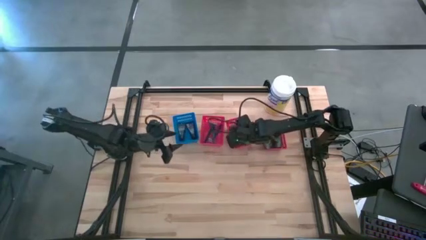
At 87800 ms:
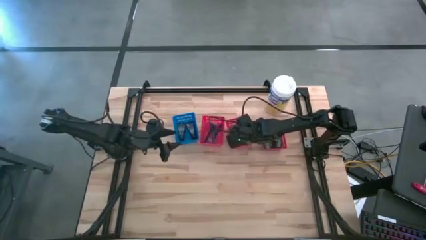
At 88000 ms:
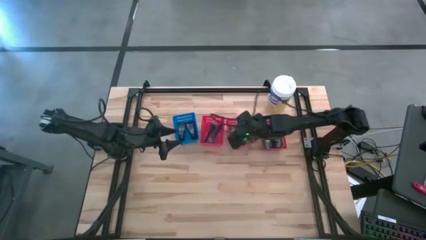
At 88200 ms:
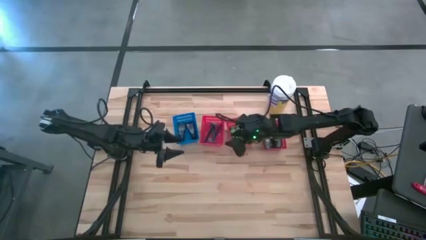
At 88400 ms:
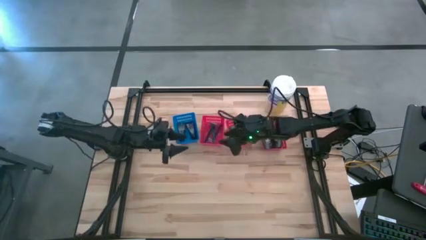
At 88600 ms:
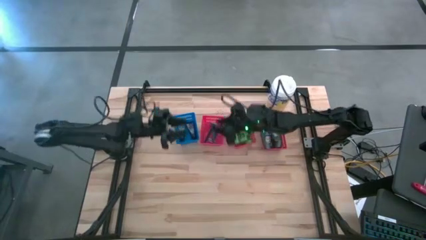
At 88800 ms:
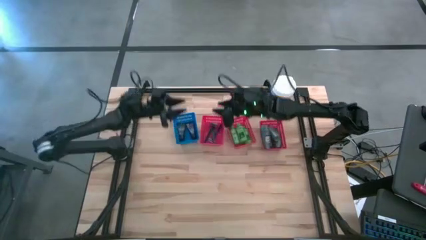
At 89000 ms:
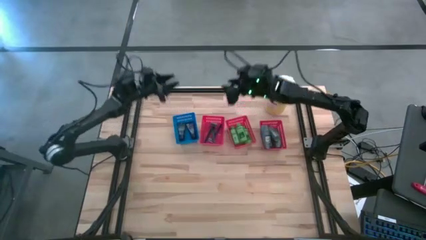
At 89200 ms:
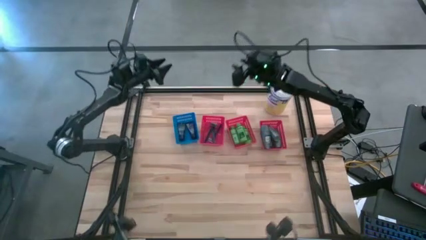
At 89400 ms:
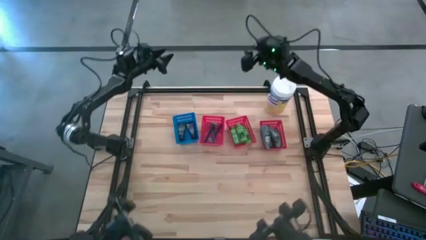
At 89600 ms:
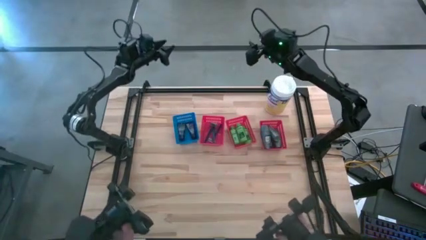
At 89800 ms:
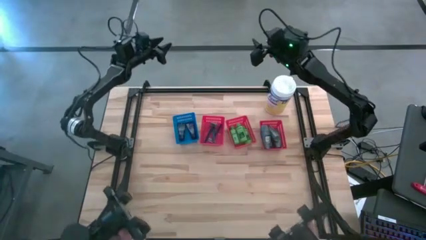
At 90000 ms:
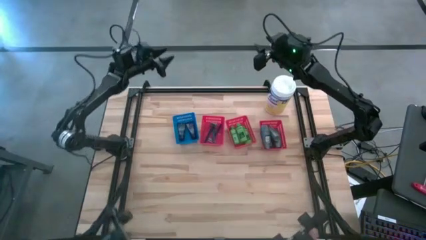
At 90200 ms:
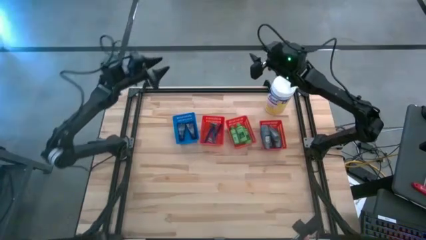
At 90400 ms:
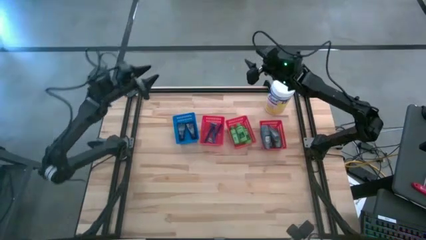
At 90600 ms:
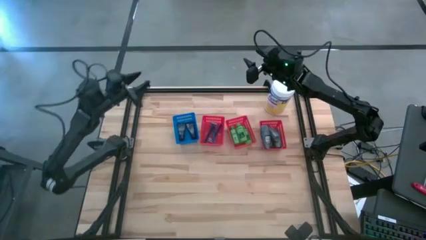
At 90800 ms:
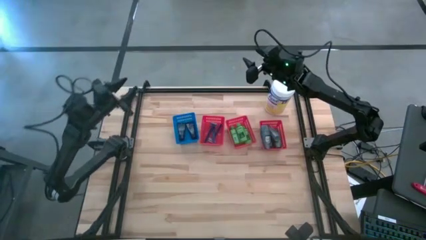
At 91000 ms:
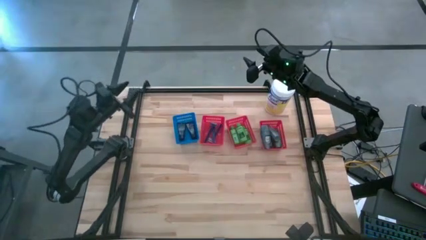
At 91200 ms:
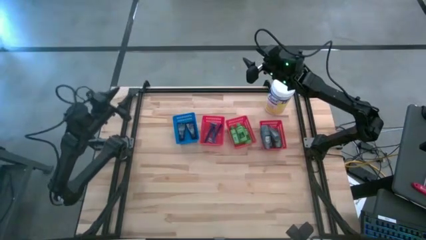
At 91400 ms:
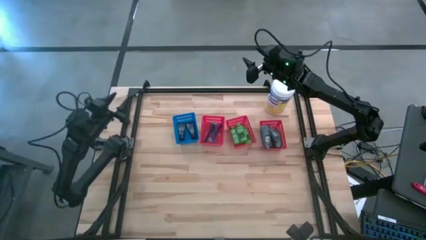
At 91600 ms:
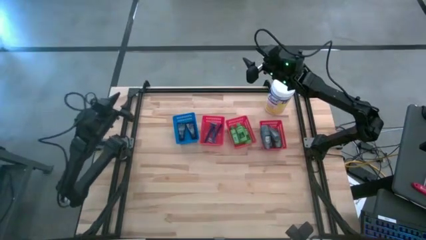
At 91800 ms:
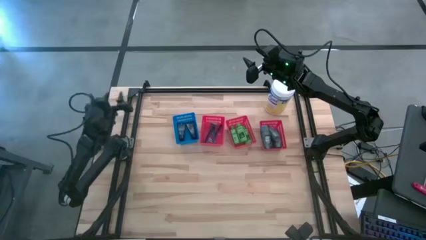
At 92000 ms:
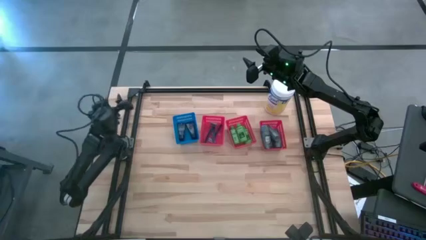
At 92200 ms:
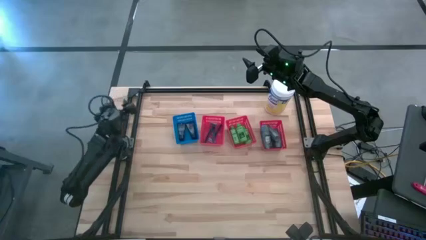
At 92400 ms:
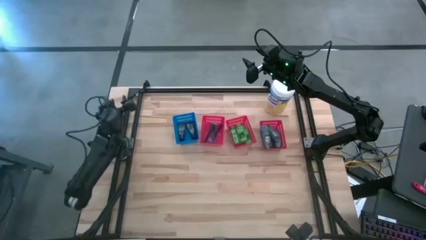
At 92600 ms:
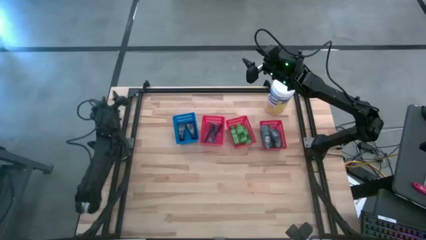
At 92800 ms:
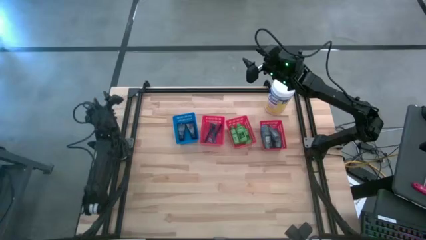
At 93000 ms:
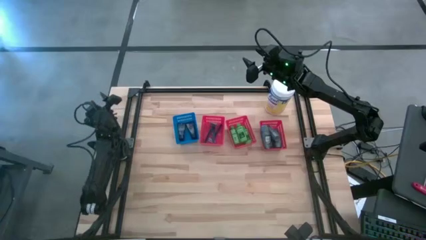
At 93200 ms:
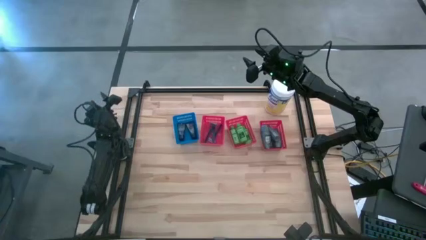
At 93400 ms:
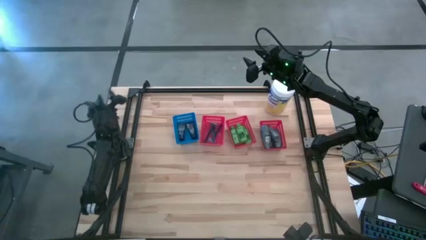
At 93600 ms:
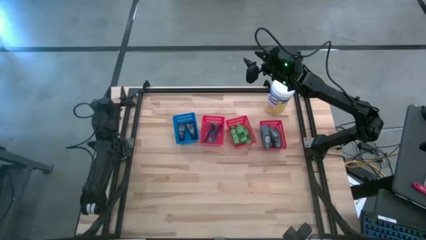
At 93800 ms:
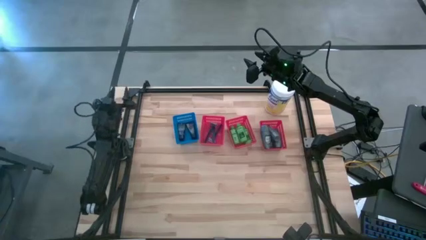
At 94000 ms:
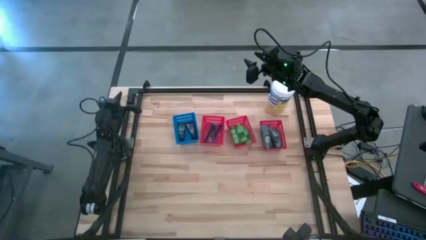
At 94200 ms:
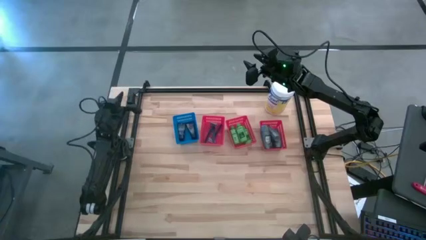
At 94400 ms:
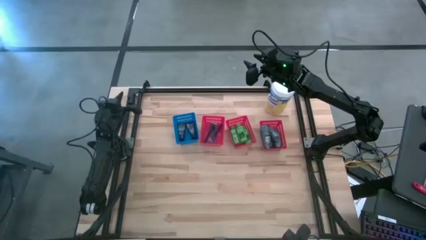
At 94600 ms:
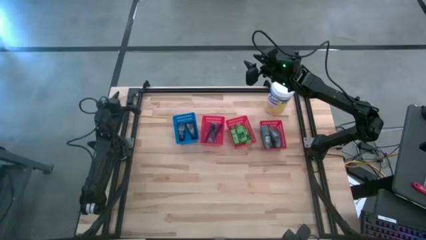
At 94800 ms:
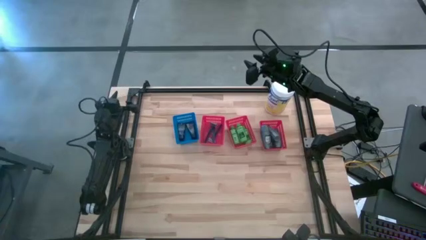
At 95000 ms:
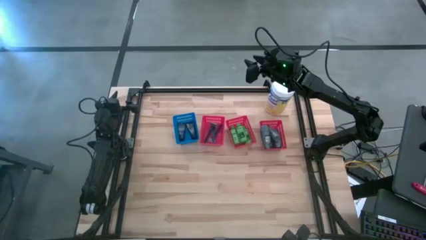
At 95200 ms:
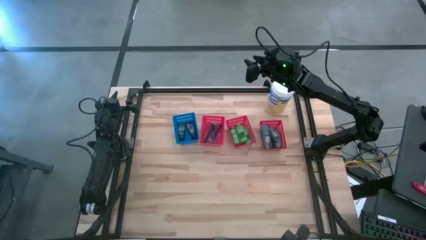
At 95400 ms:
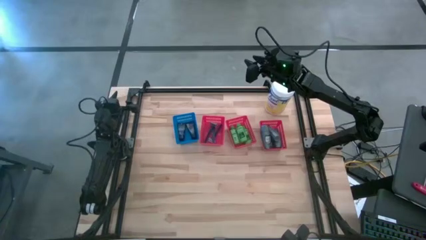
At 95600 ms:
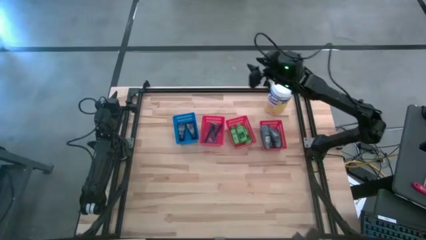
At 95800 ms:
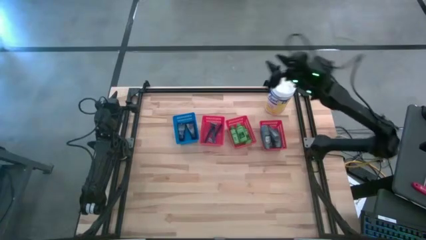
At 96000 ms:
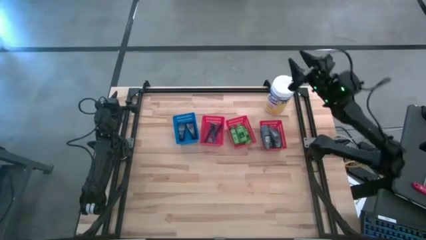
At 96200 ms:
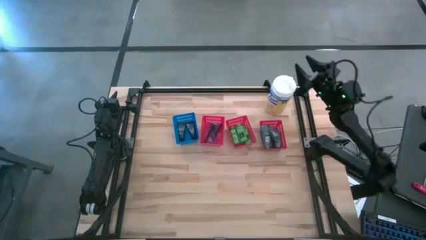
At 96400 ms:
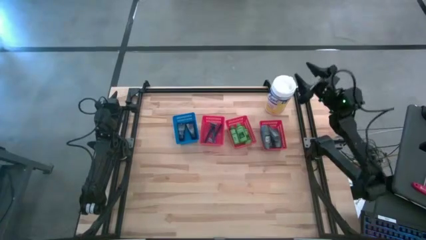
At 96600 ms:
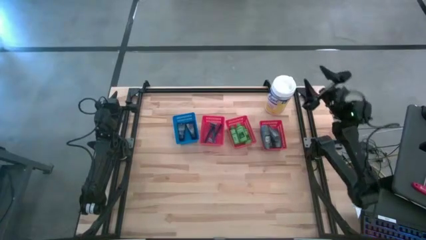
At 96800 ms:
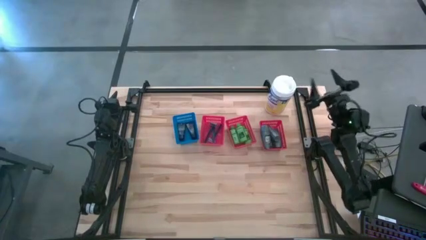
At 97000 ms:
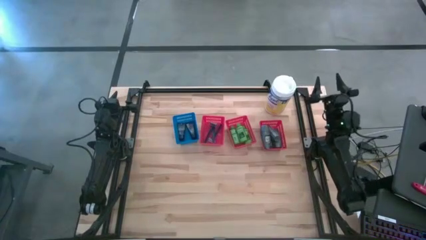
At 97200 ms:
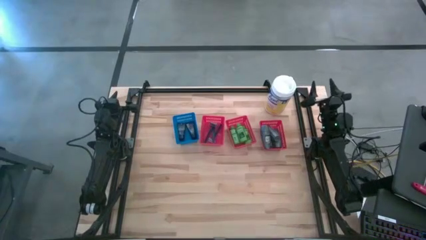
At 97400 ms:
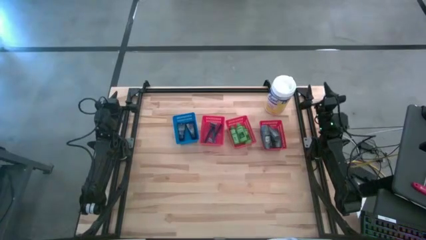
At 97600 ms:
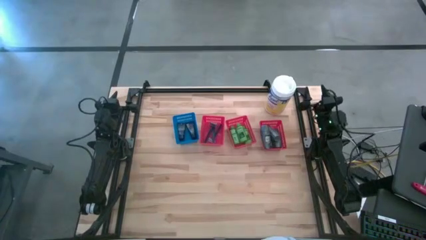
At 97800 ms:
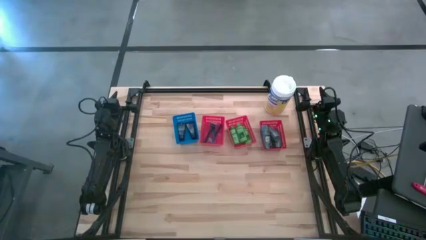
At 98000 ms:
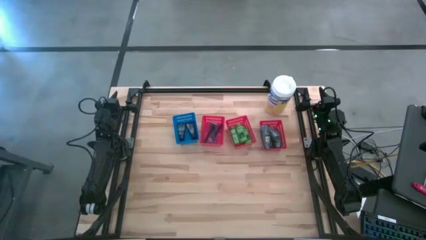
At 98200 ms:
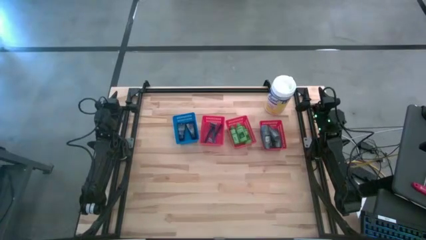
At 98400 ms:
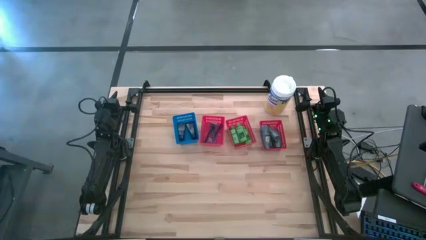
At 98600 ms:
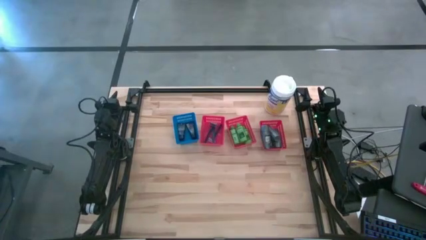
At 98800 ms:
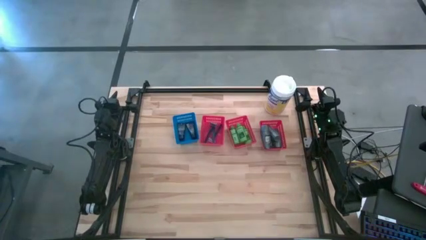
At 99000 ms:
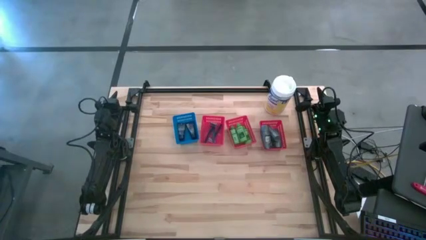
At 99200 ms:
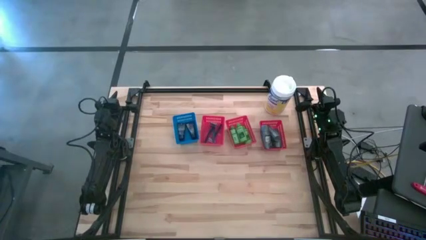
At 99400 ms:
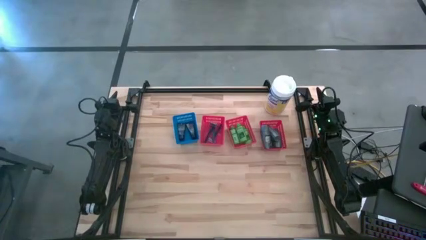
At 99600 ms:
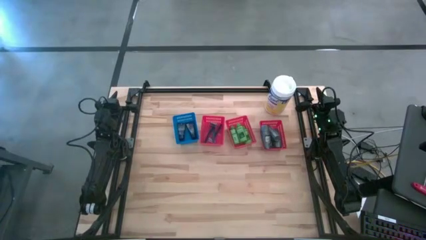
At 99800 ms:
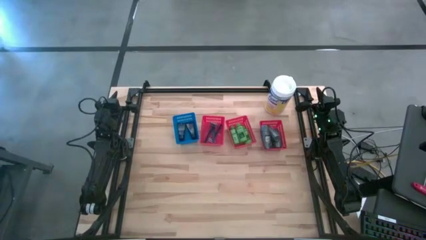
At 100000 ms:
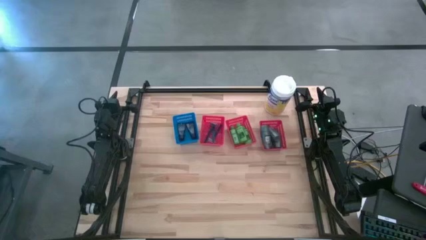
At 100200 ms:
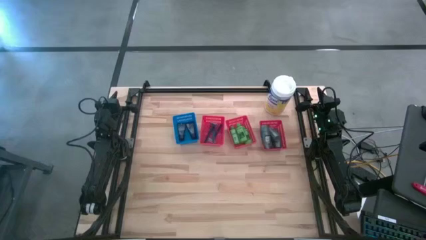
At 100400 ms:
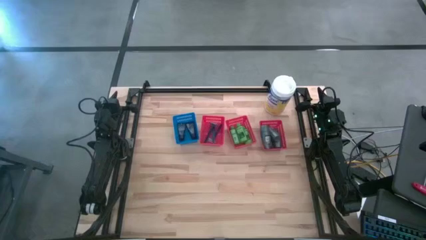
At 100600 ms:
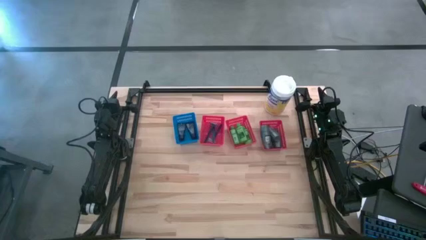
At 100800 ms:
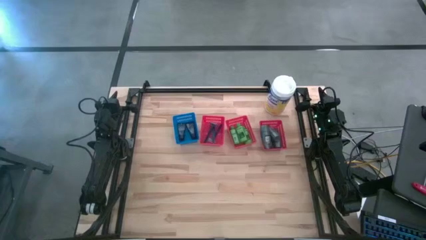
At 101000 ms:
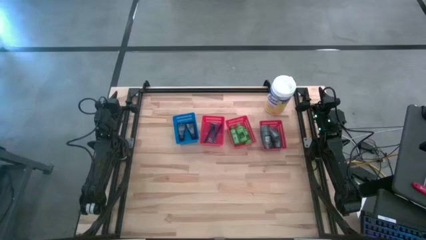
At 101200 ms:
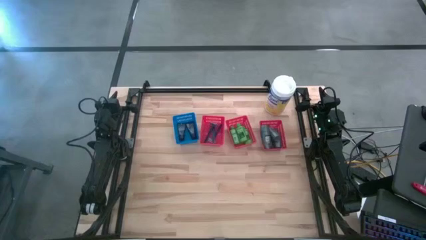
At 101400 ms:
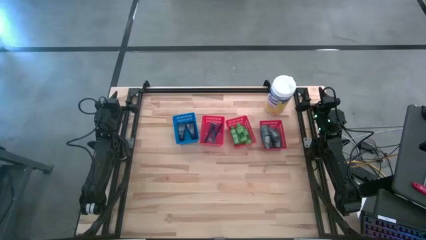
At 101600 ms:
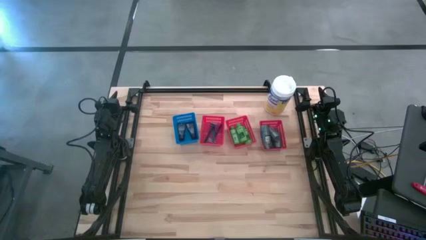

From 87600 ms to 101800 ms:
Task: Pick & Place Travel size toiletries
Return to Home Position

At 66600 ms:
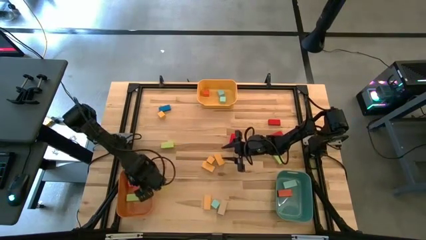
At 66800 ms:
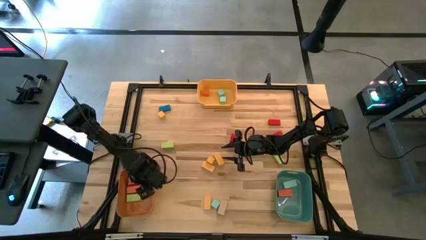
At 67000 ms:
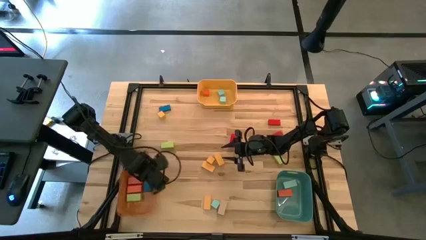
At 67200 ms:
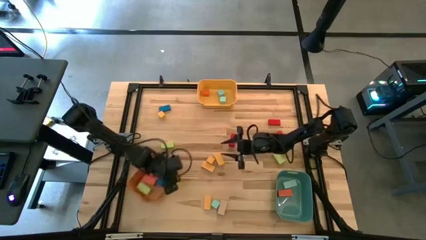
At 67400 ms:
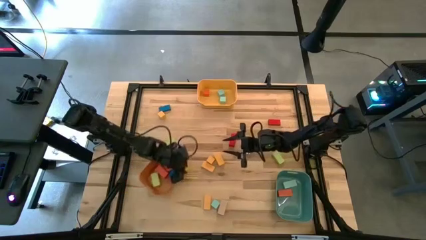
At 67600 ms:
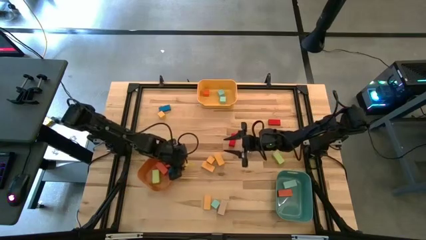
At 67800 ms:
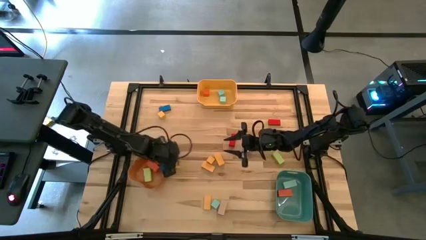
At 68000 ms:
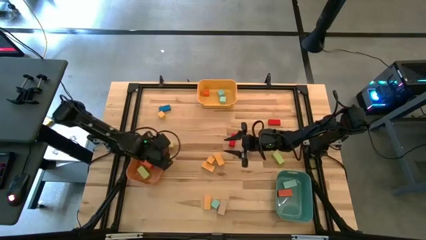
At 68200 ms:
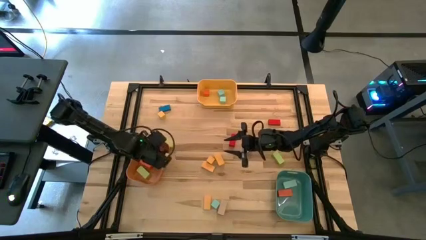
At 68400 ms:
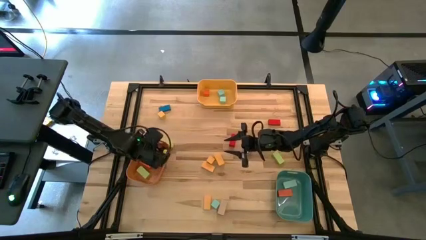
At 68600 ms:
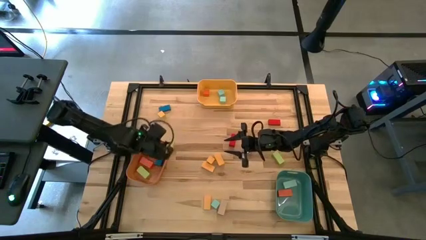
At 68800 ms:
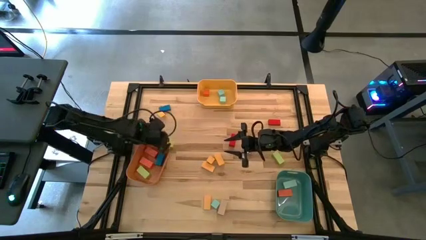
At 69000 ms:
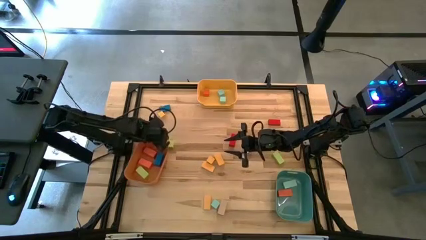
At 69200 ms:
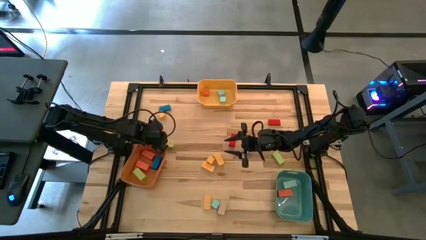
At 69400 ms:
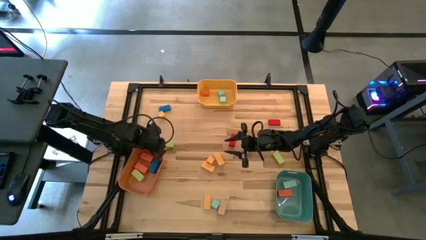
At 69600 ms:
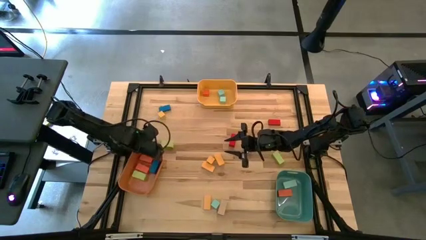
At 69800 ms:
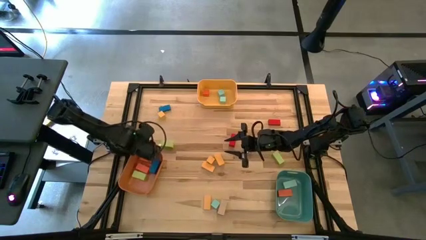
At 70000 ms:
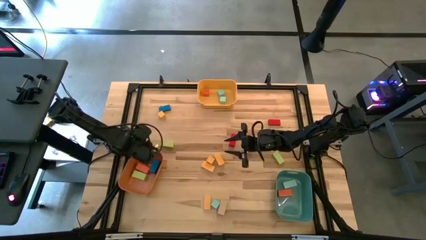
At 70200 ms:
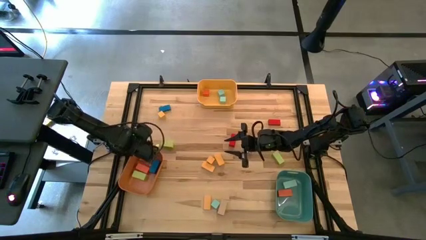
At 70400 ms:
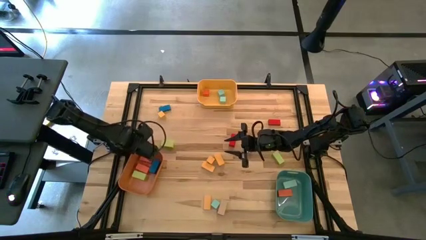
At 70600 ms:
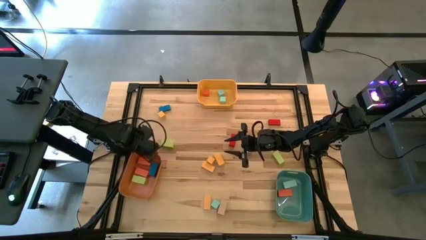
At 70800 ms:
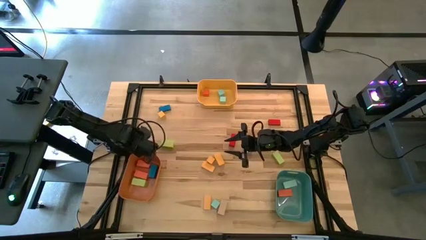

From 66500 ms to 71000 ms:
Task: Sort blocks by size
Adjust the orange bin
